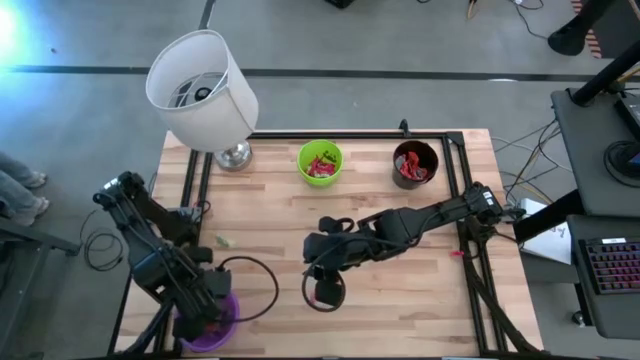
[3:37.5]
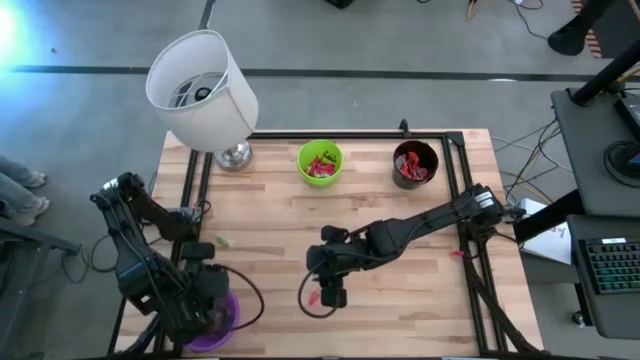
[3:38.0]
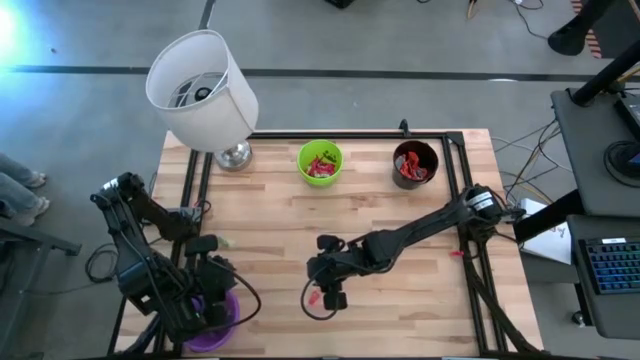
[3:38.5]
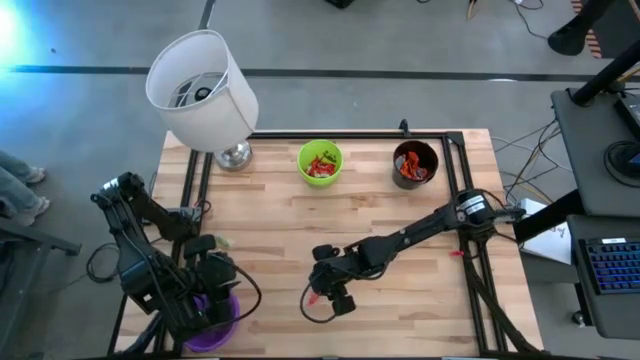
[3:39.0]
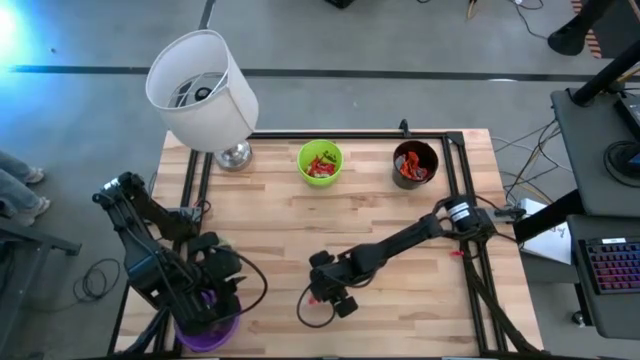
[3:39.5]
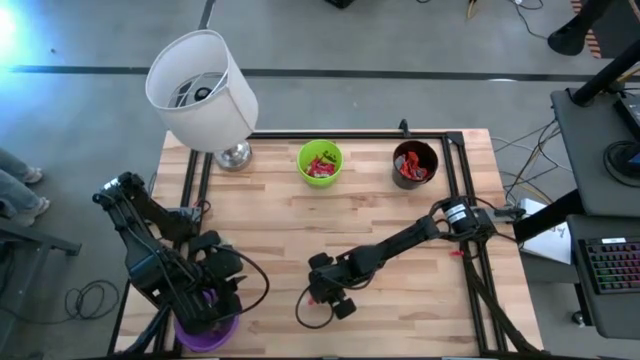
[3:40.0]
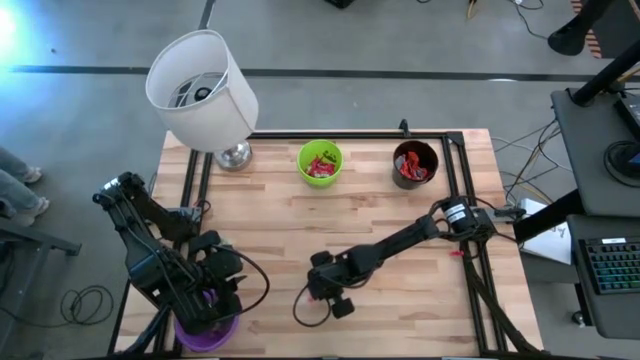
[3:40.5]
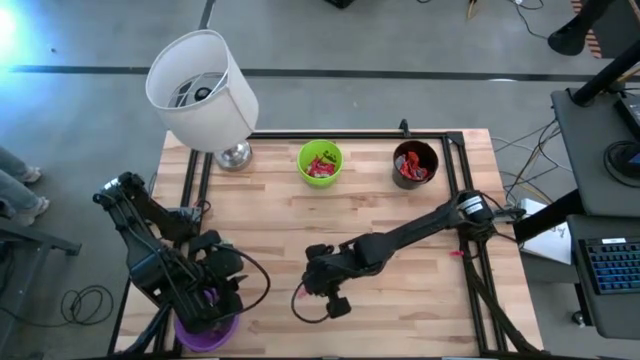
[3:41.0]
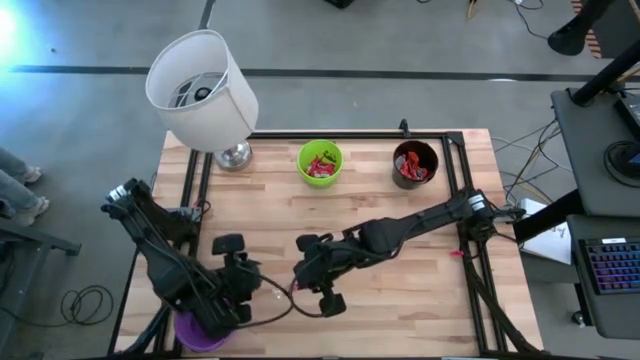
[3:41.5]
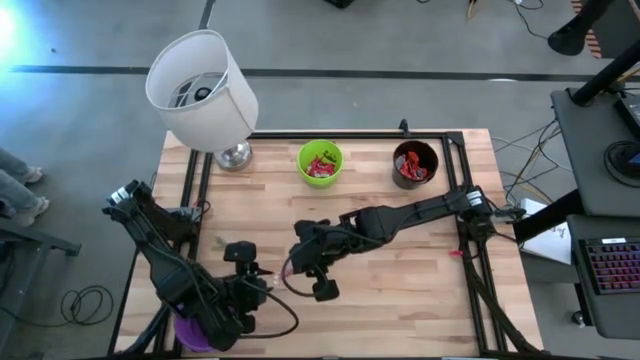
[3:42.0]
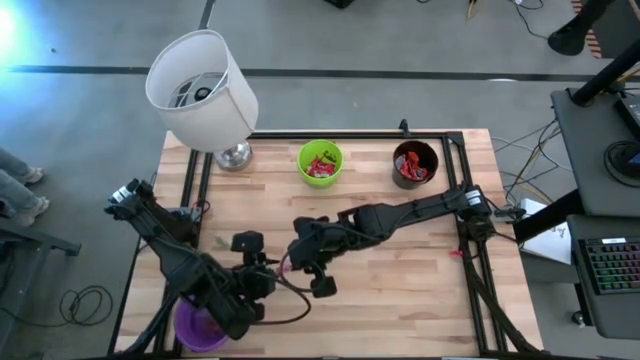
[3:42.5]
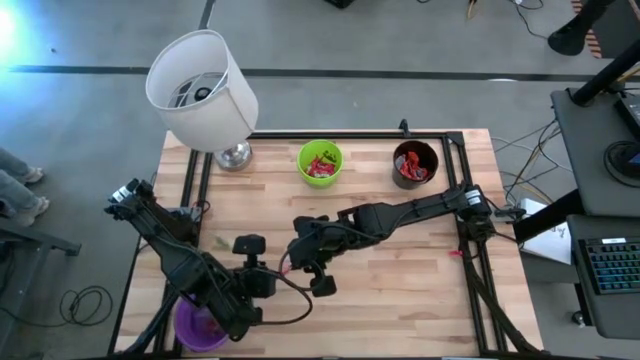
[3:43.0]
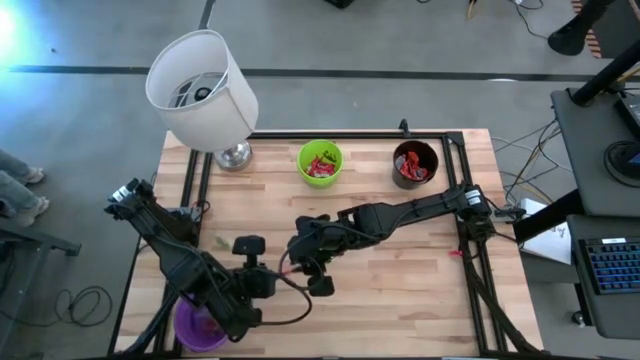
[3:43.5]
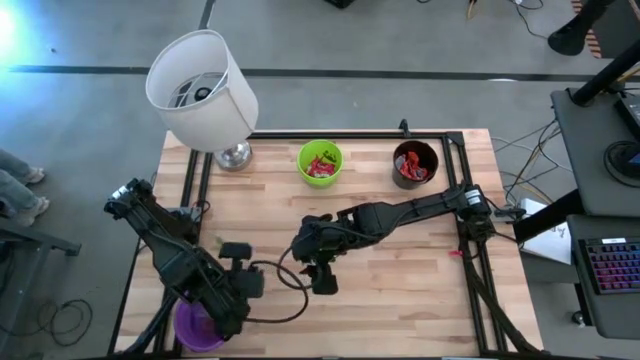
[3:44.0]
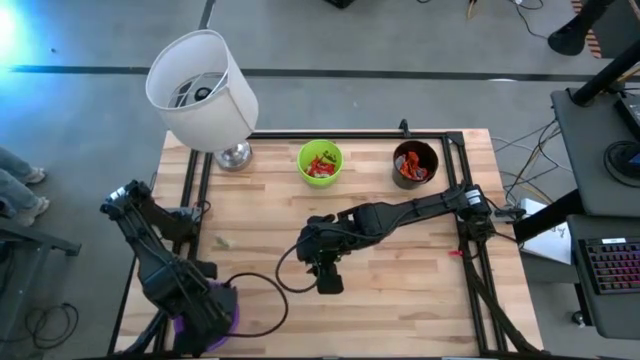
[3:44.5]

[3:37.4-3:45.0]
Task: Sort candy
Put the orange gummy candy into the violet bucket

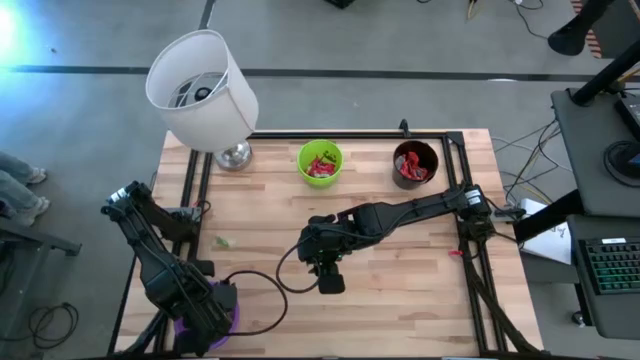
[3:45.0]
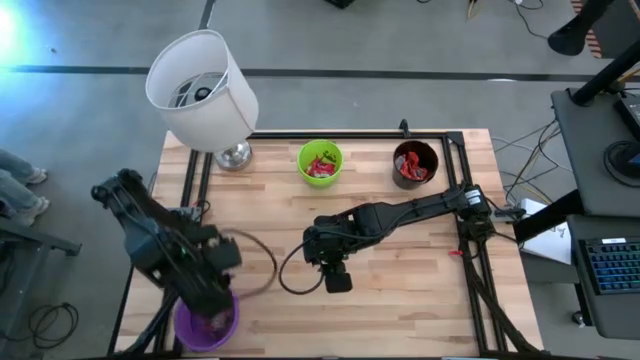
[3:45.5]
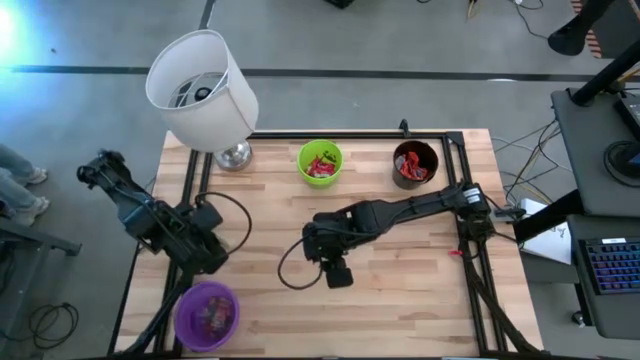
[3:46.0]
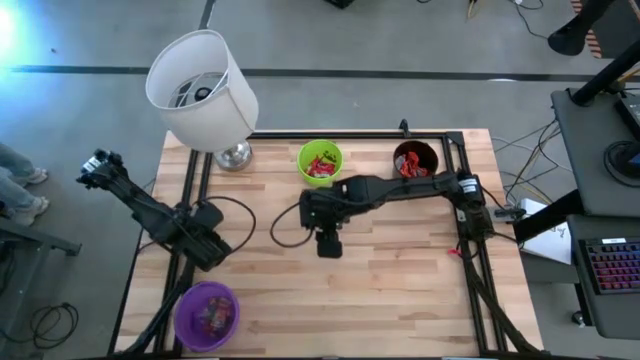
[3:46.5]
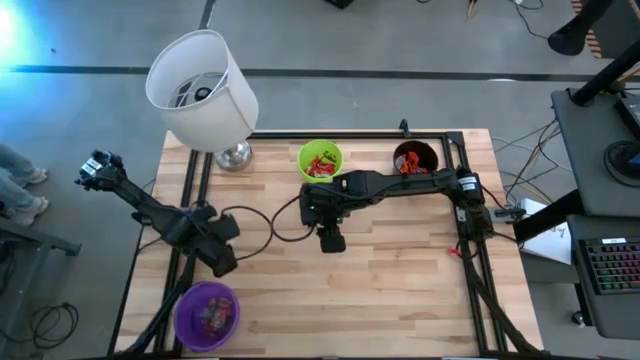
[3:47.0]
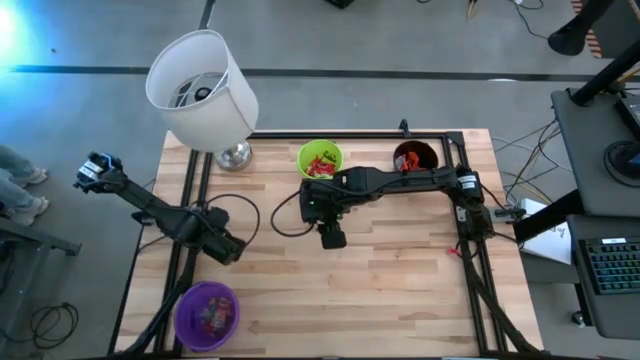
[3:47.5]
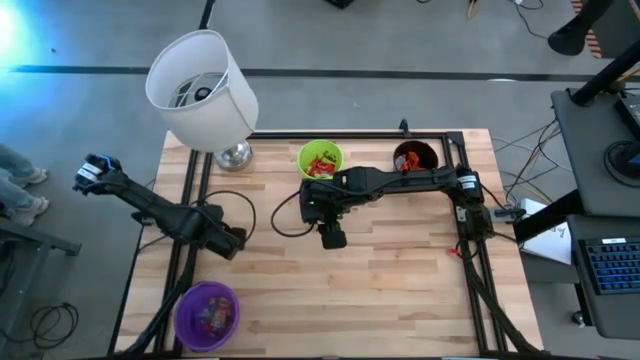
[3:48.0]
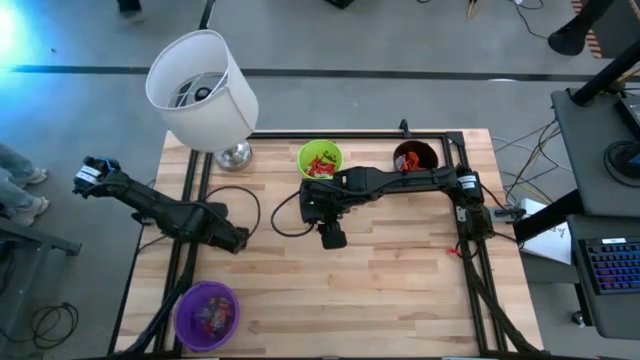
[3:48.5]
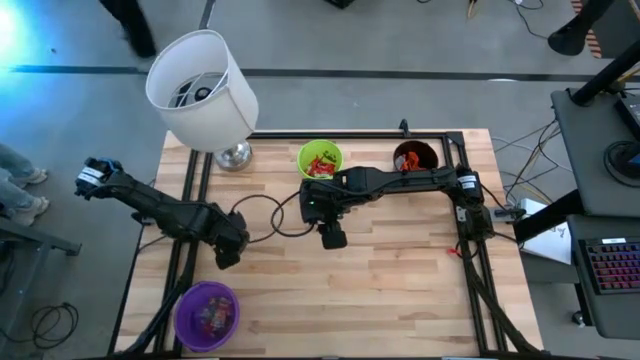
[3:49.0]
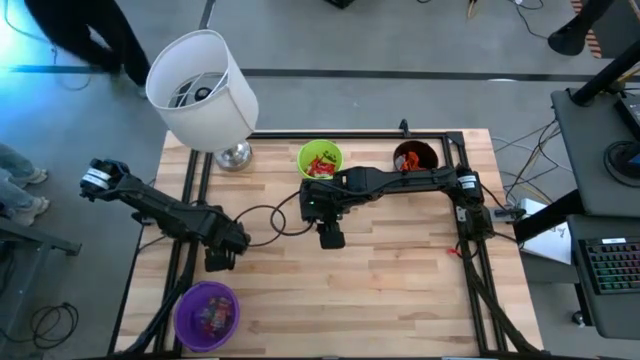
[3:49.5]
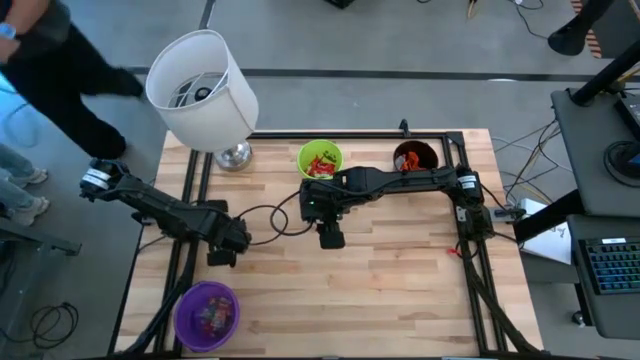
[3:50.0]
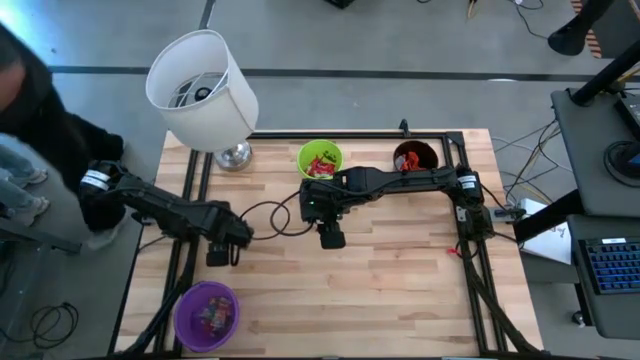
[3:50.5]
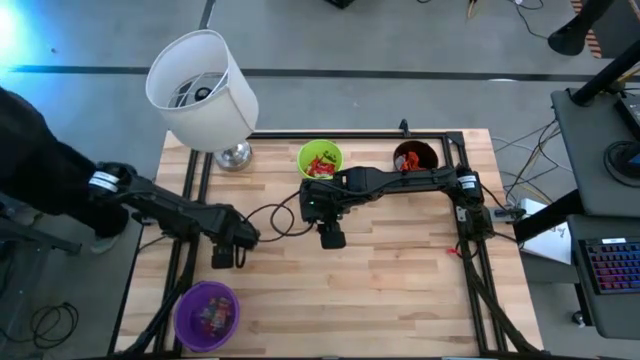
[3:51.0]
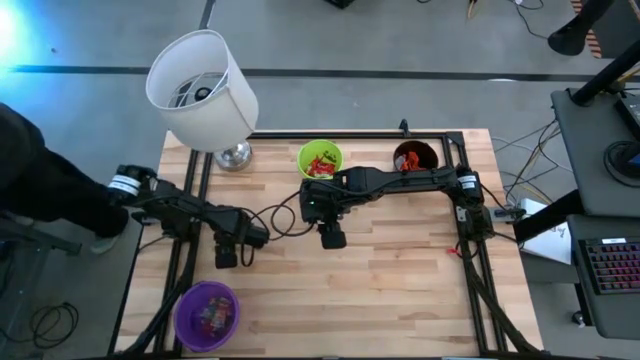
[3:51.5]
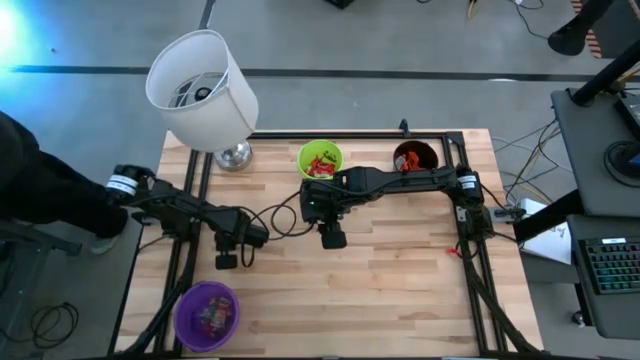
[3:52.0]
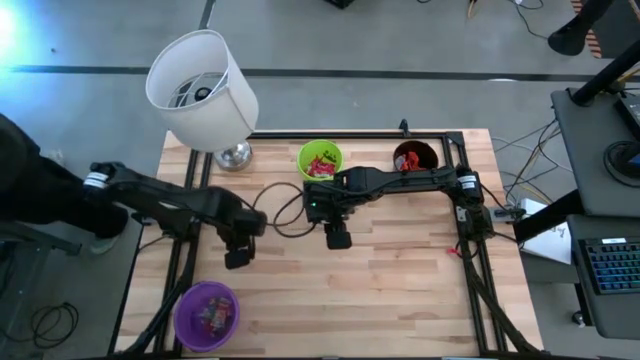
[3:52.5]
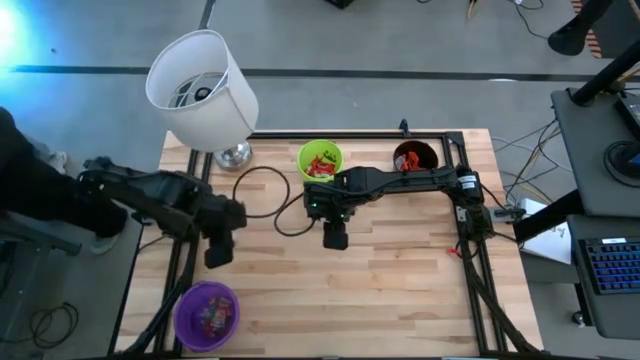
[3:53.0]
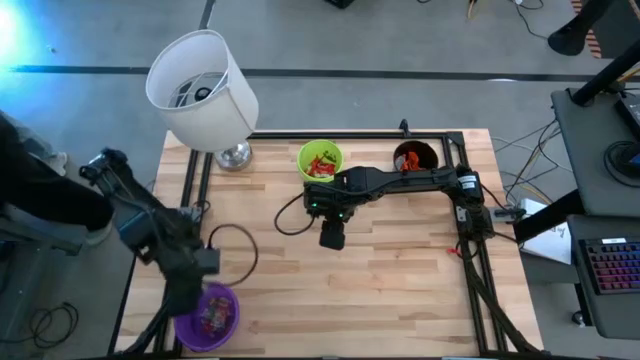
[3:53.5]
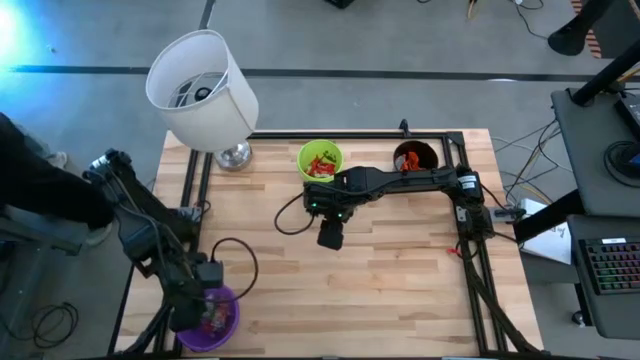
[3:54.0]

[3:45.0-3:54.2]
Put the green gummy candy into the violet bucket

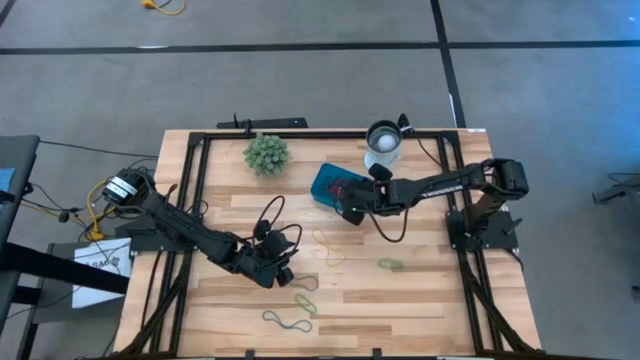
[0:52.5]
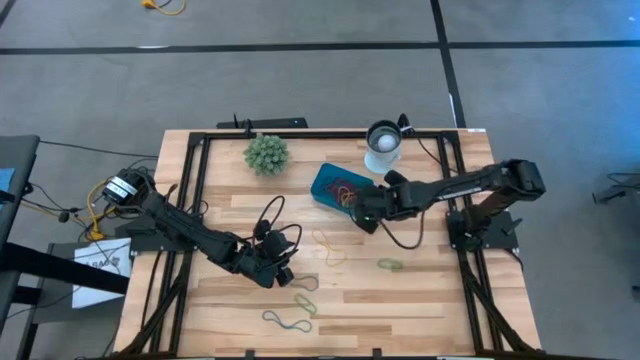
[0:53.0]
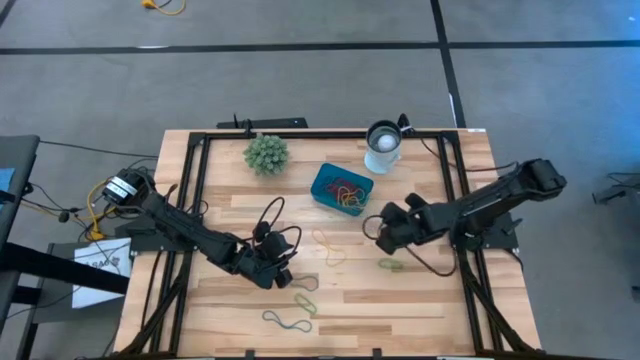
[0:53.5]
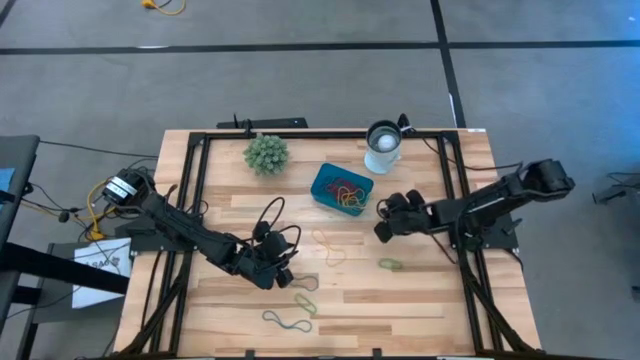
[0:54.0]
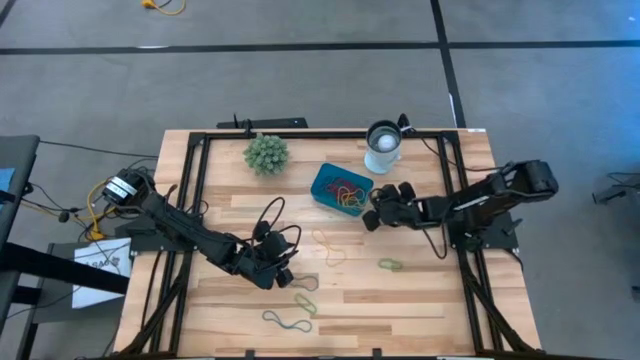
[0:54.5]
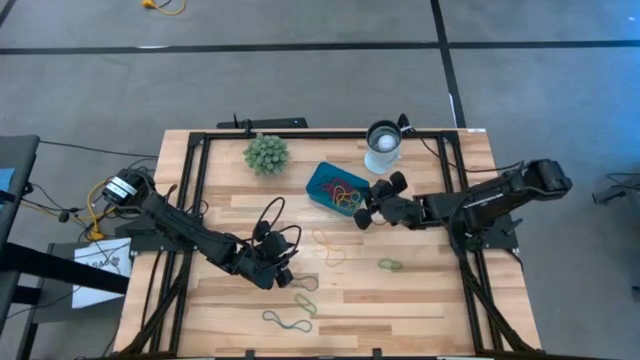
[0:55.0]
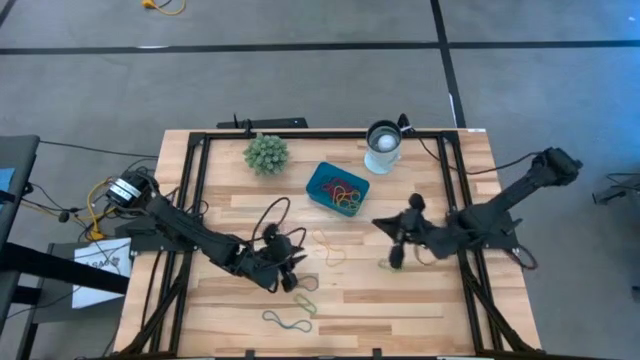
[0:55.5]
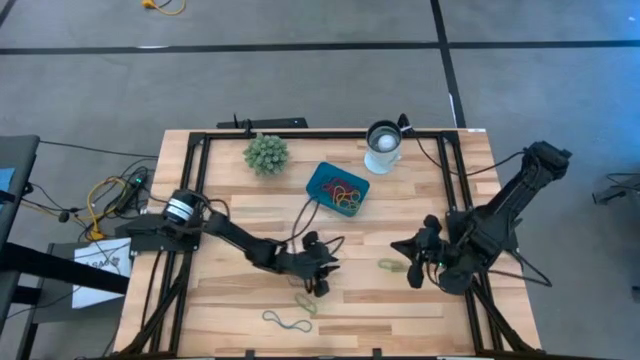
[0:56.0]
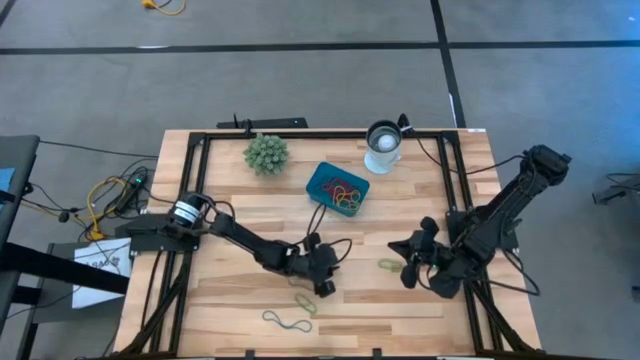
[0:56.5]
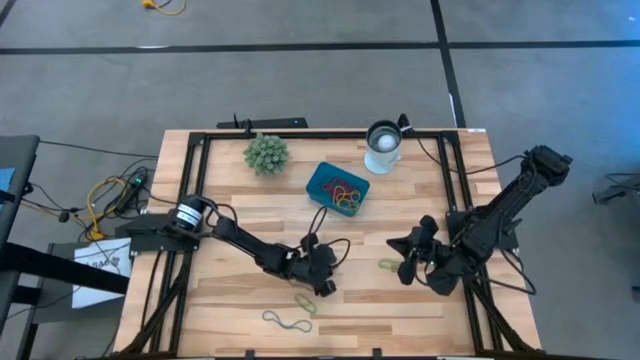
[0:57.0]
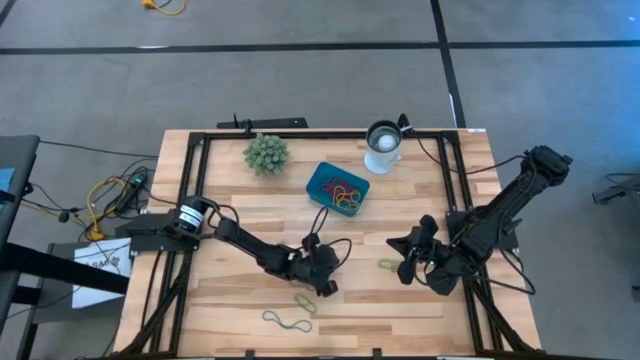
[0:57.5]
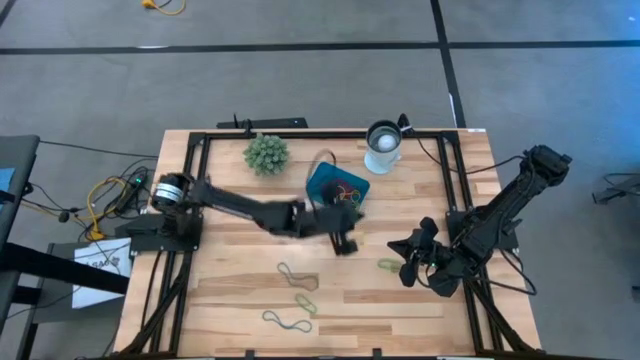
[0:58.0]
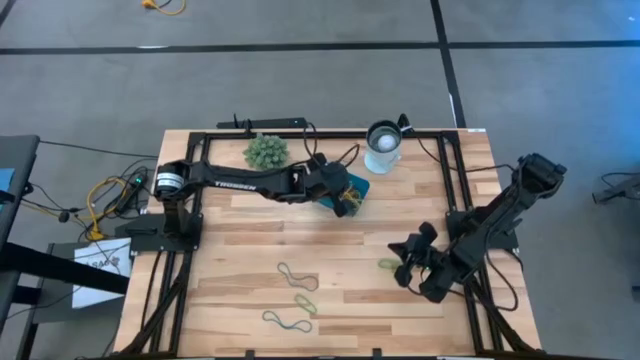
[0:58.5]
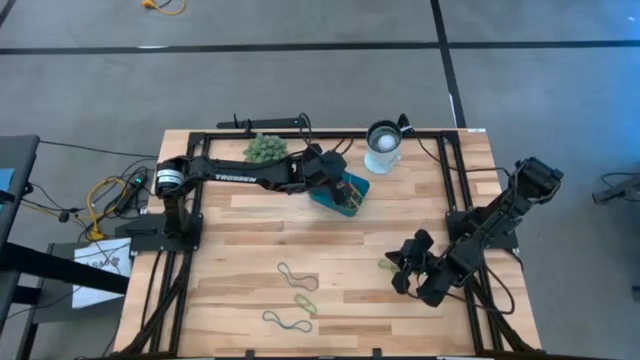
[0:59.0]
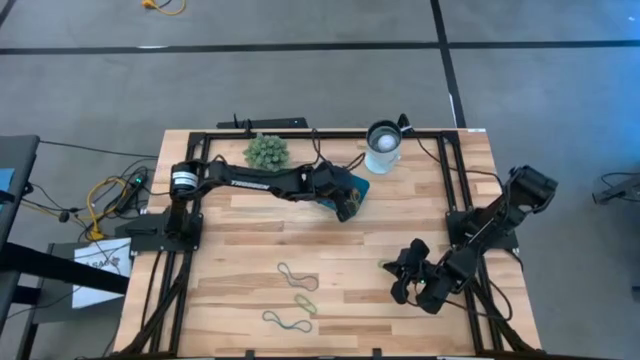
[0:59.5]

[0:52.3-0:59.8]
Task: Pick and place items into bin
Put the yellow rubber band into the blue bin
